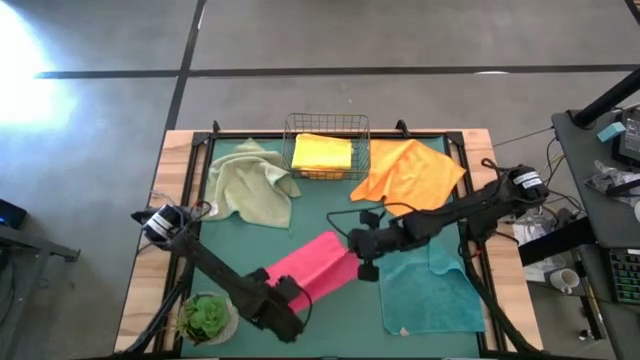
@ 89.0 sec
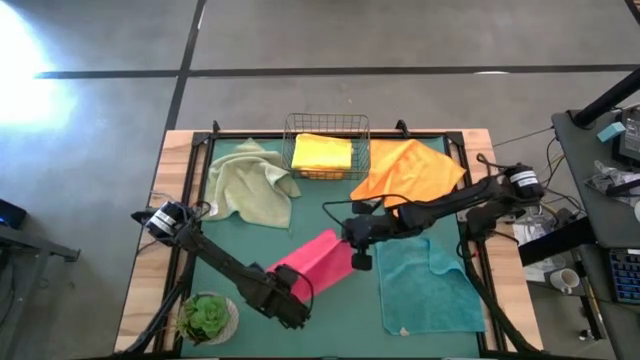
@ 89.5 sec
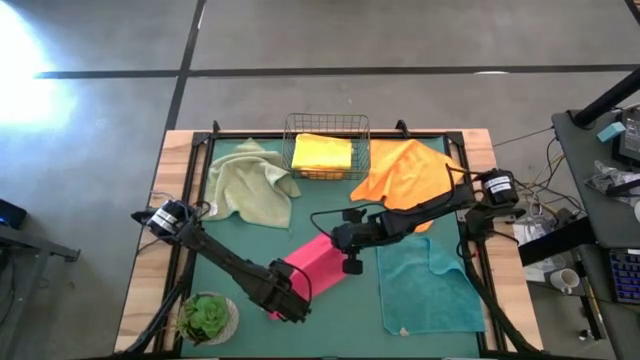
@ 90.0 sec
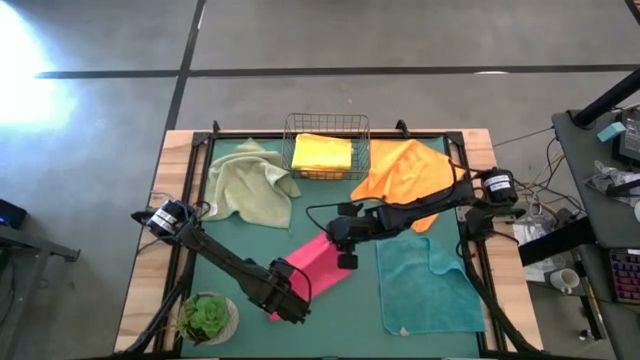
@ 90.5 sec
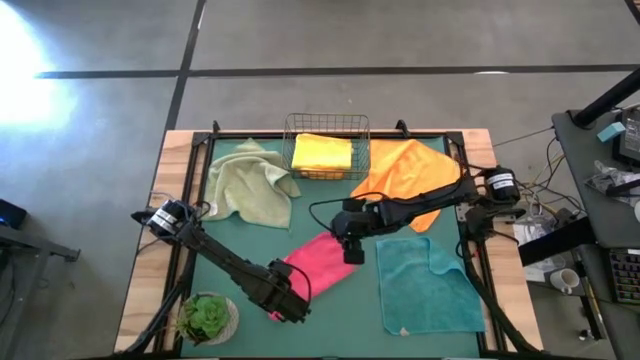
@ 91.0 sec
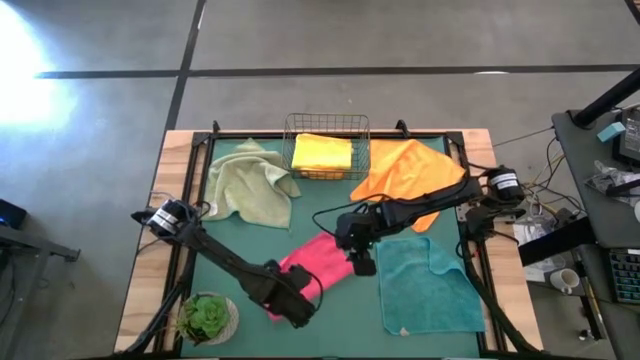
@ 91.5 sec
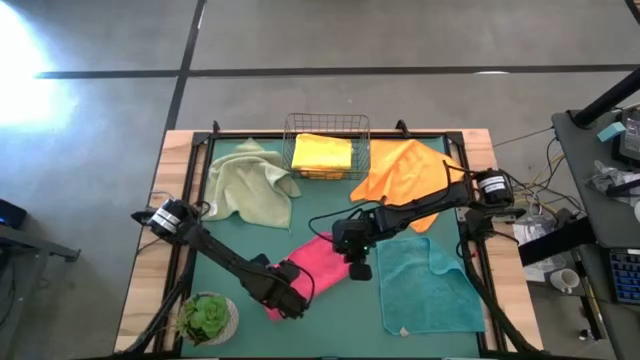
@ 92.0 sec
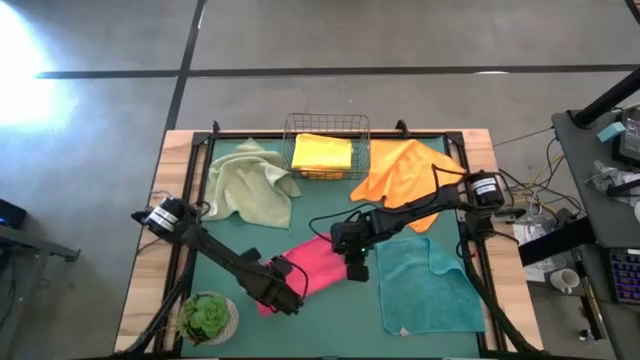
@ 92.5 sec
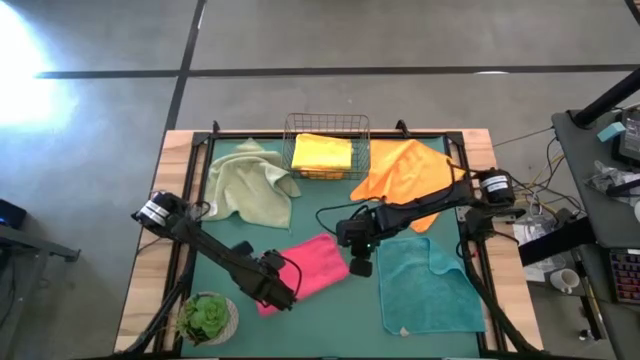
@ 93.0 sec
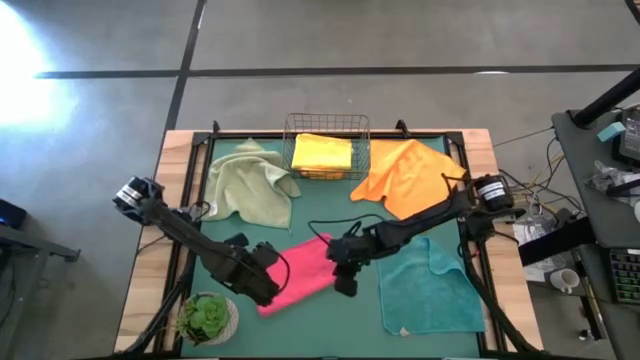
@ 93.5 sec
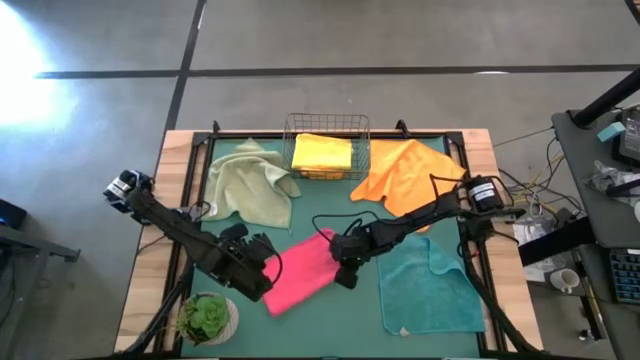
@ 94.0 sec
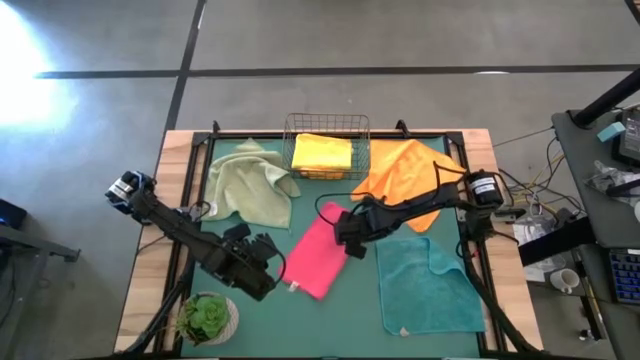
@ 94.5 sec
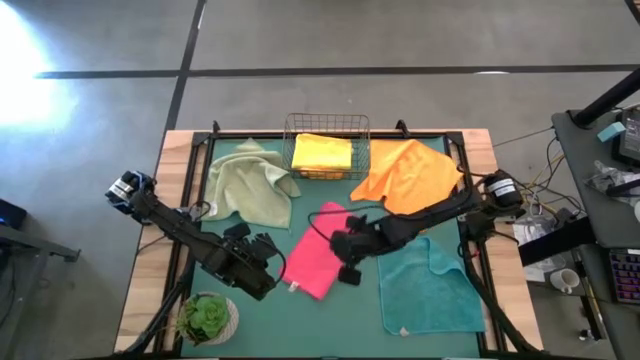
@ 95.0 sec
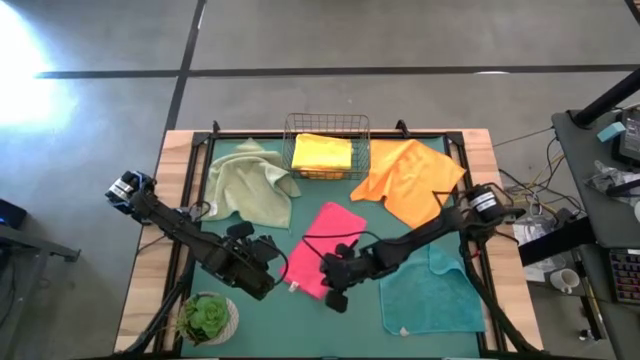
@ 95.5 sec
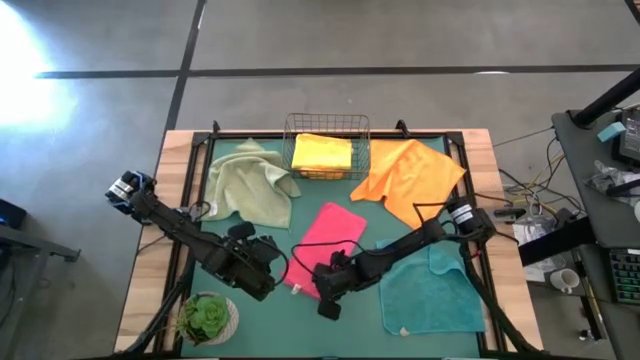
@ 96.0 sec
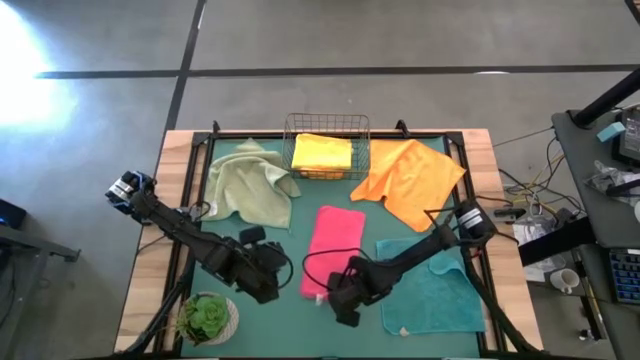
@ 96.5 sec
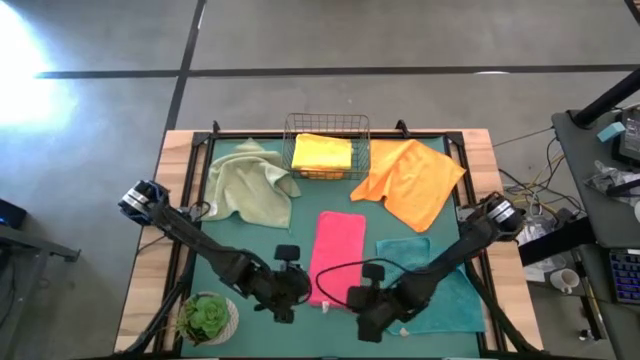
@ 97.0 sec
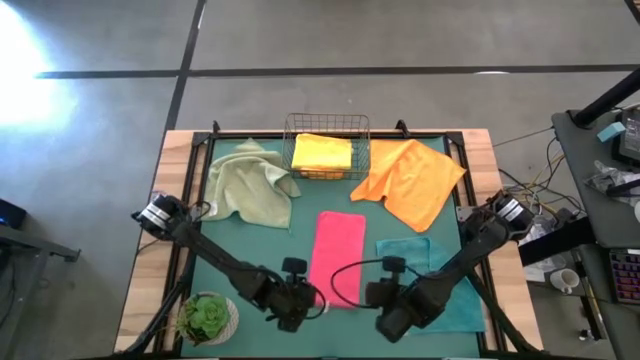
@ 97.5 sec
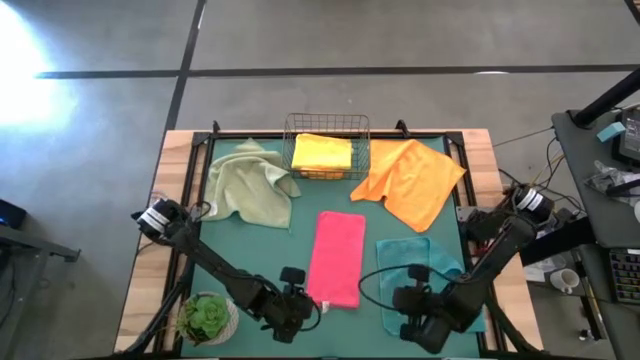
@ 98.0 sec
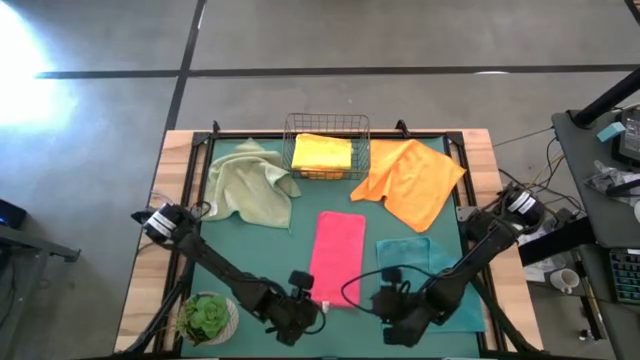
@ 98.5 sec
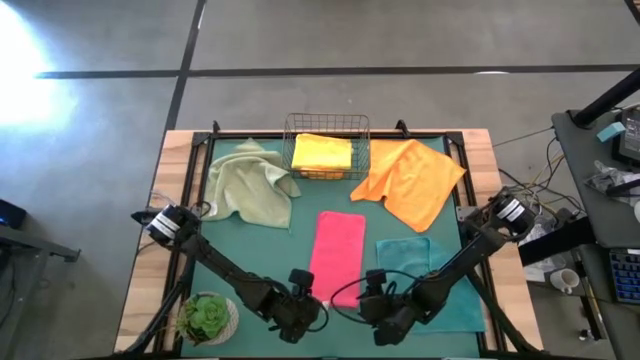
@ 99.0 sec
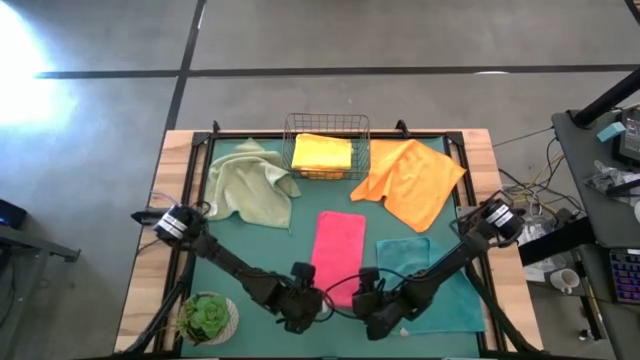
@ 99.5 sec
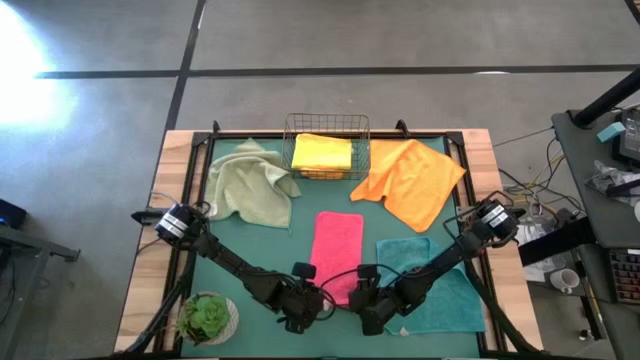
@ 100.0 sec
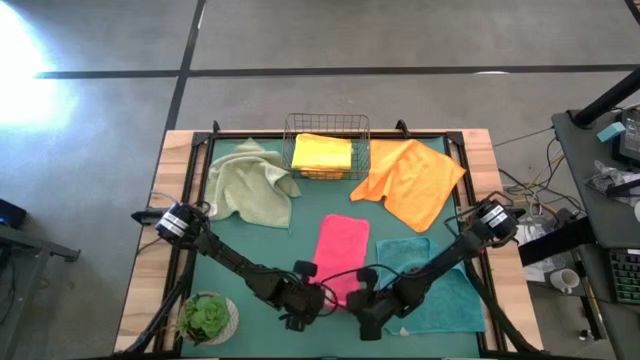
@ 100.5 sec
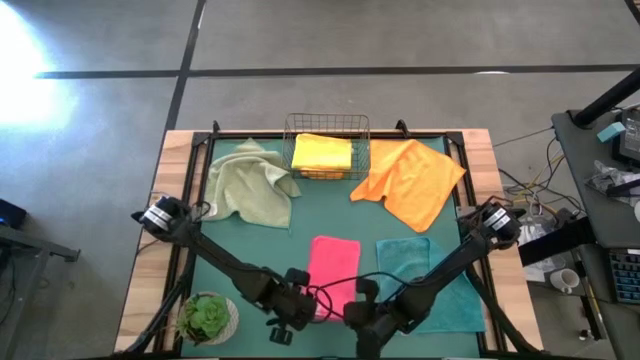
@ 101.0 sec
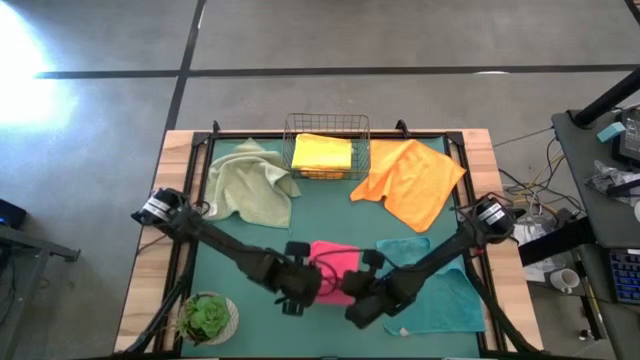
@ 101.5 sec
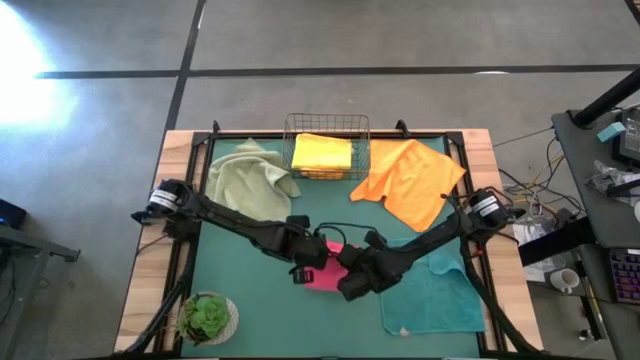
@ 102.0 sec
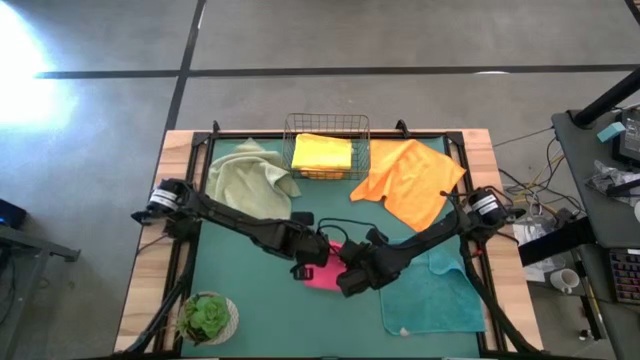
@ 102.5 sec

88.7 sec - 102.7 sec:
Task: Fold microfiber towels
Fold the pink microfiber towel

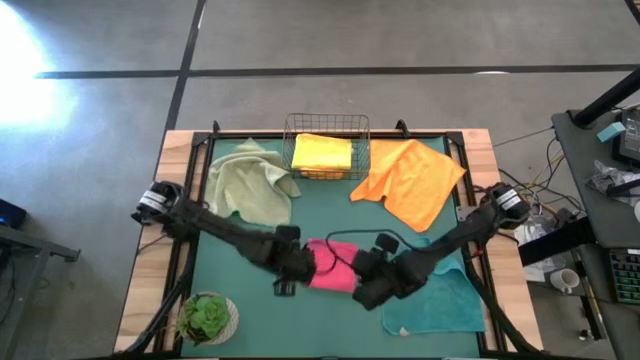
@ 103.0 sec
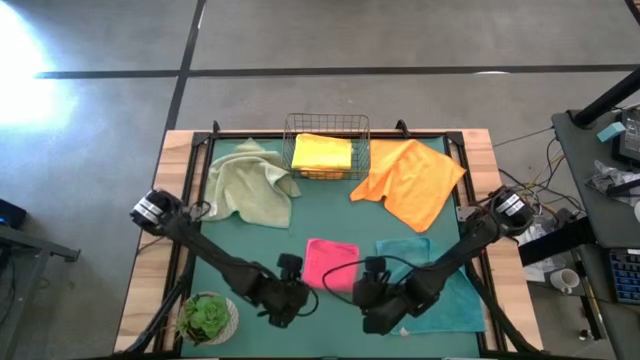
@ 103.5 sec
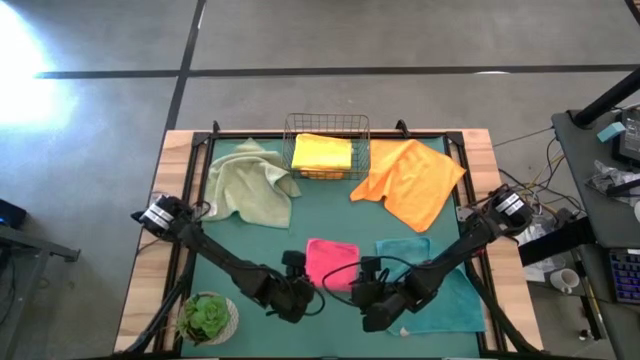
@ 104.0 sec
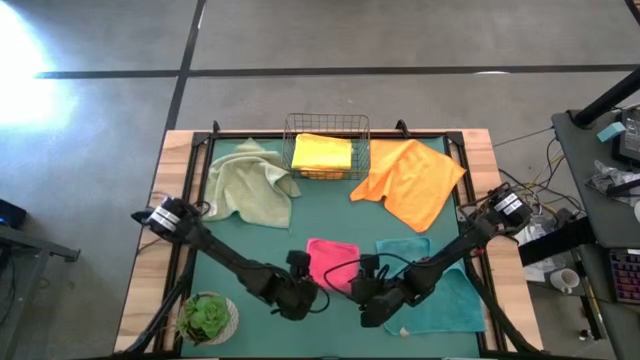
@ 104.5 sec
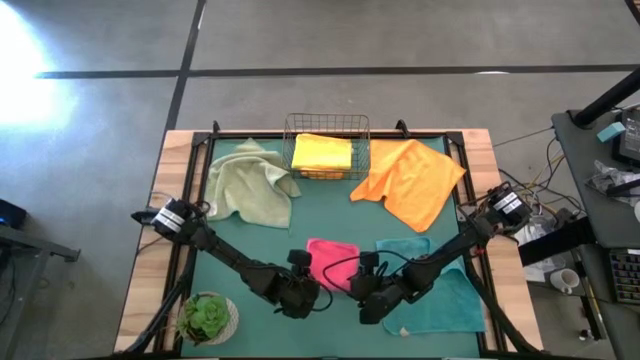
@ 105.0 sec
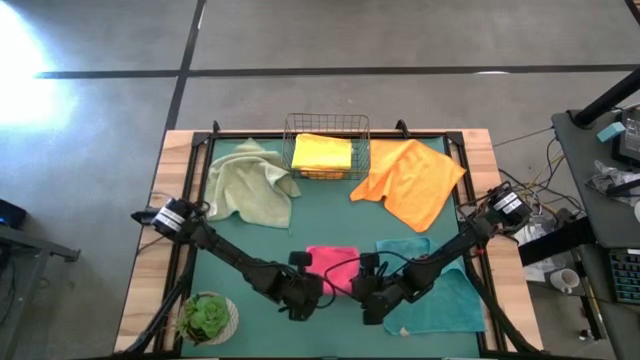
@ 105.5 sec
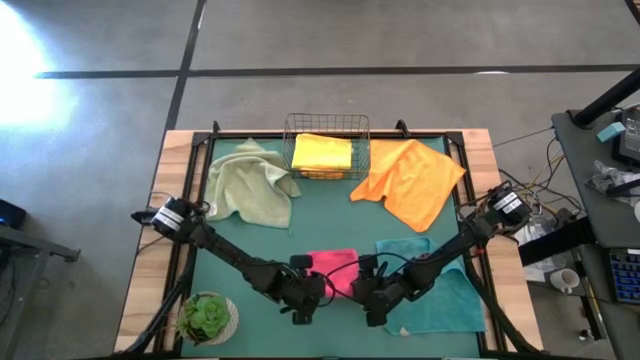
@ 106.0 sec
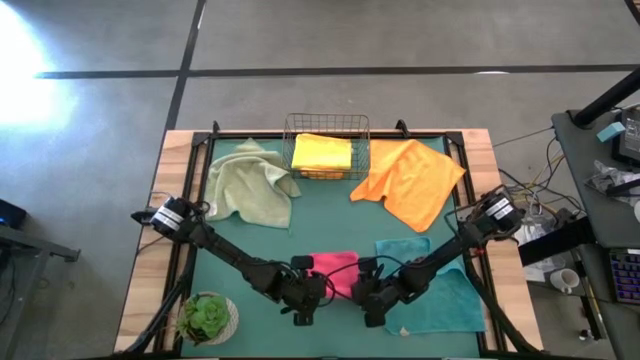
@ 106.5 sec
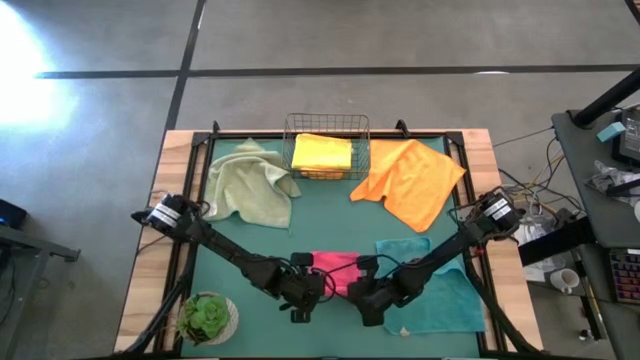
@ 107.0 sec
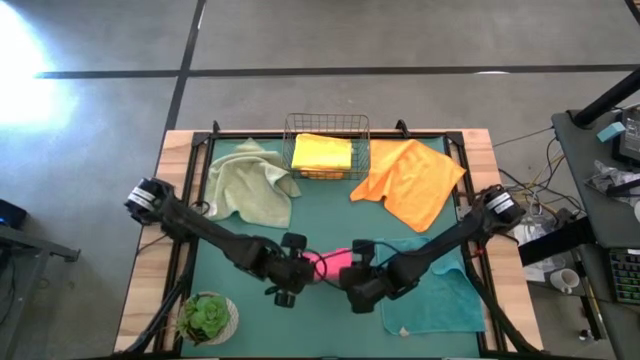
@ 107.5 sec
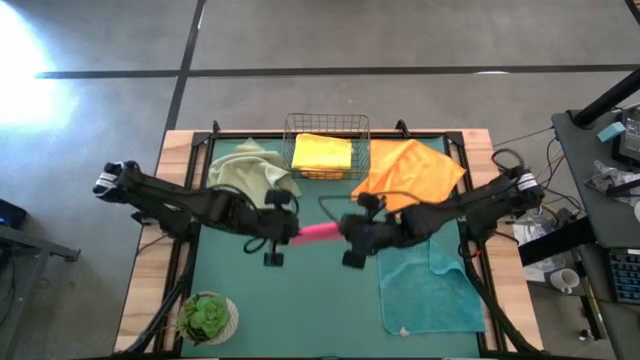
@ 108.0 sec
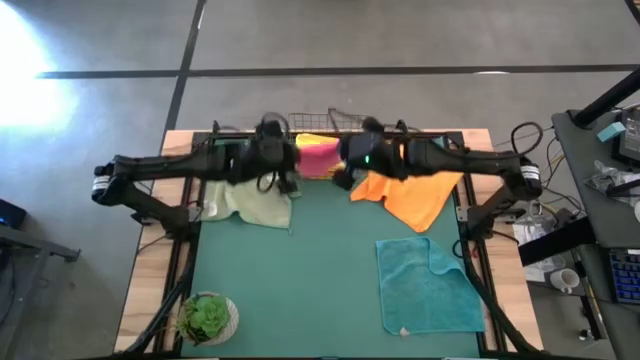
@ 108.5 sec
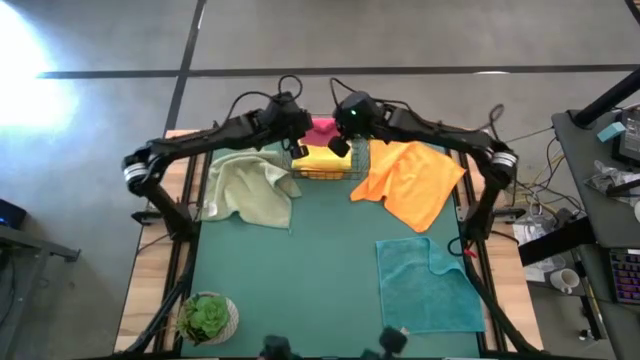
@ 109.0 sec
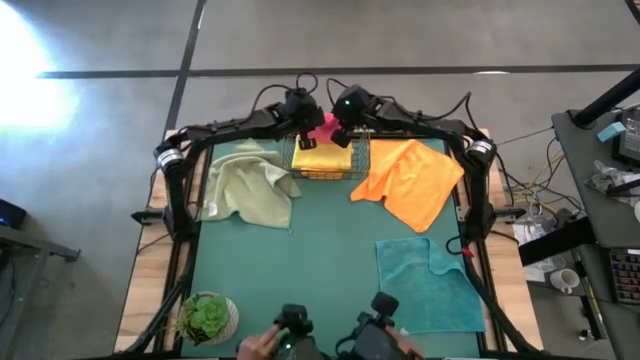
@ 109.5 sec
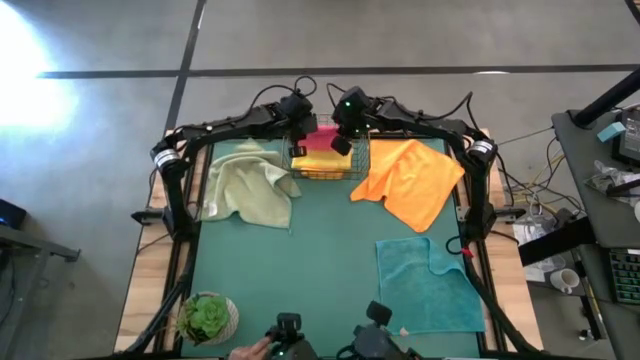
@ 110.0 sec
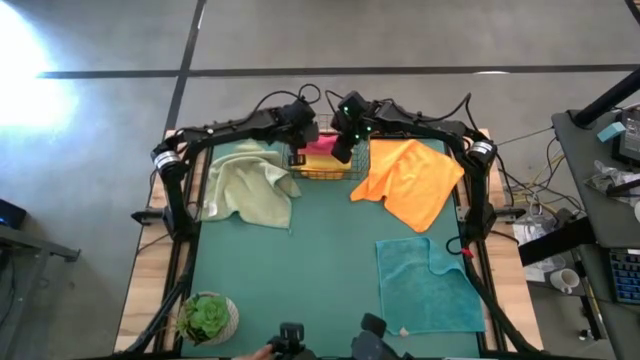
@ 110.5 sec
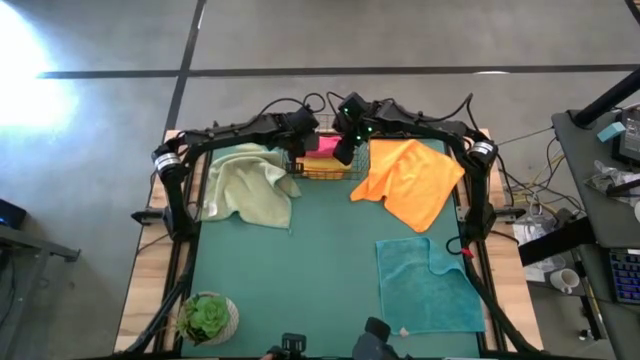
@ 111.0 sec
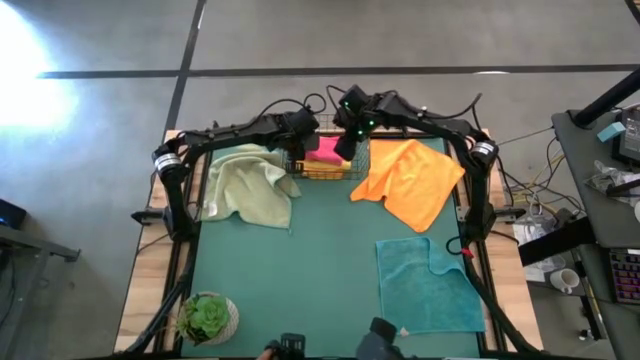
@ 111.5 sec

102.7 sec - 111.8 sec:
Put the pink microfiber towel into the wire basket
